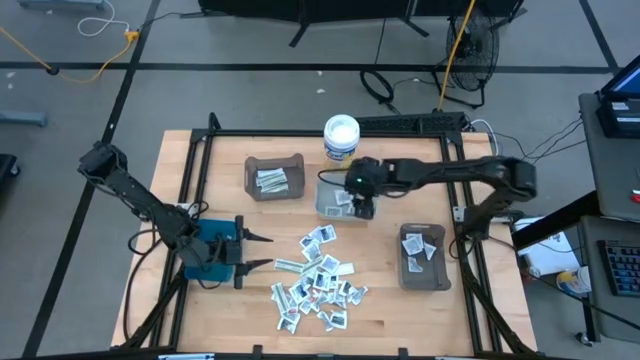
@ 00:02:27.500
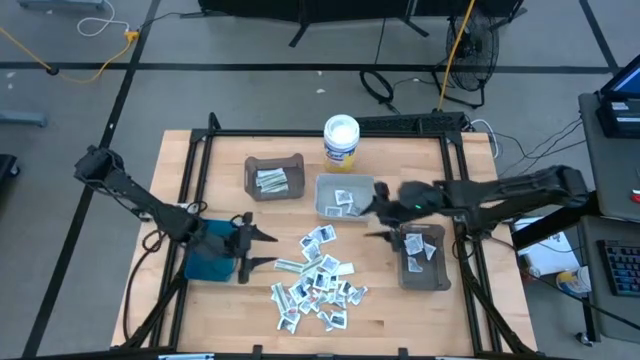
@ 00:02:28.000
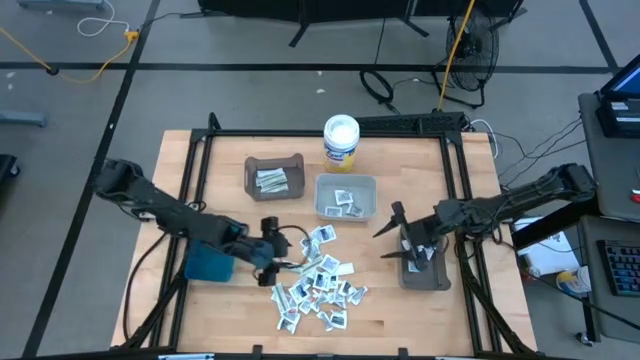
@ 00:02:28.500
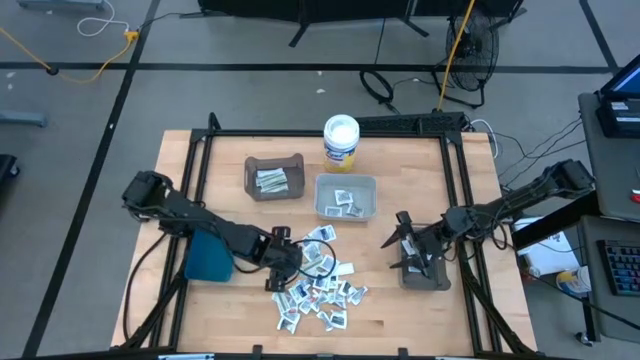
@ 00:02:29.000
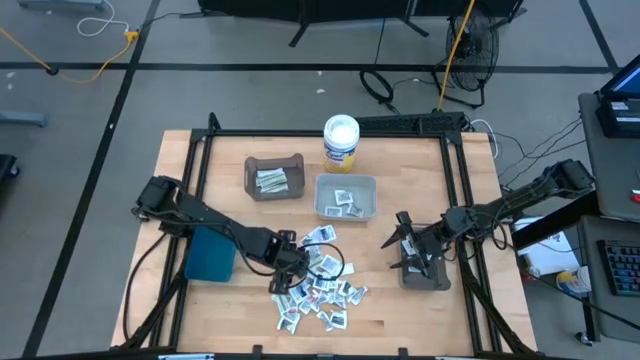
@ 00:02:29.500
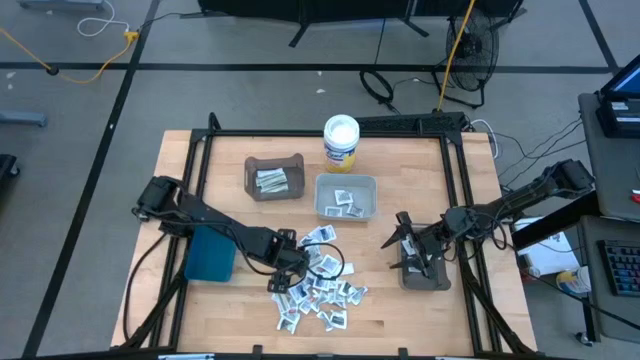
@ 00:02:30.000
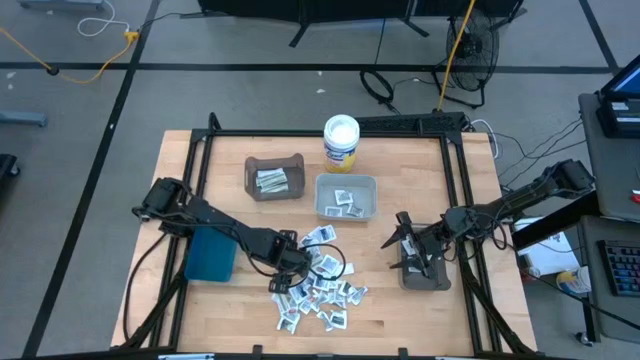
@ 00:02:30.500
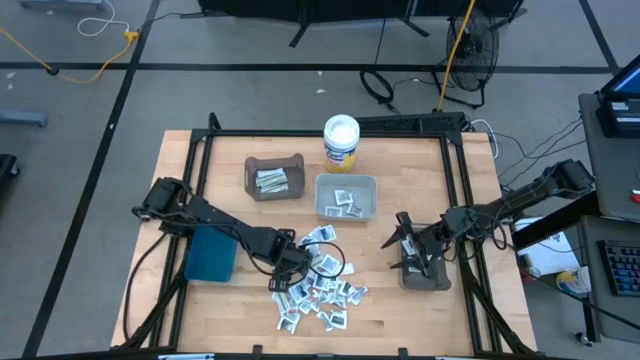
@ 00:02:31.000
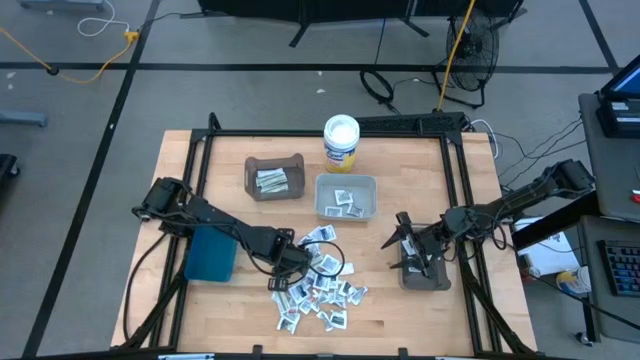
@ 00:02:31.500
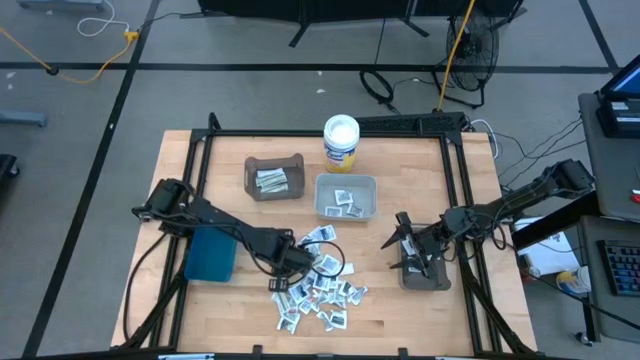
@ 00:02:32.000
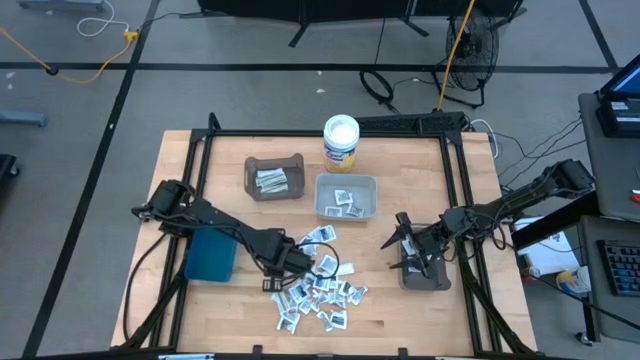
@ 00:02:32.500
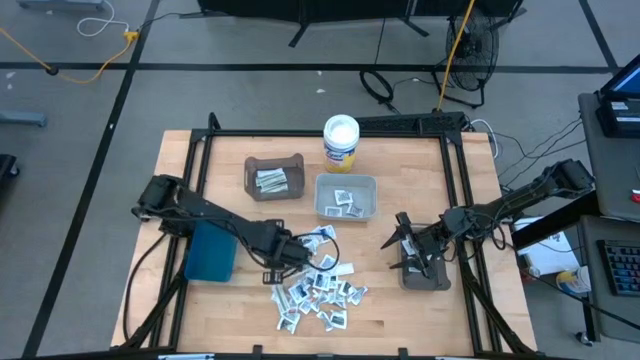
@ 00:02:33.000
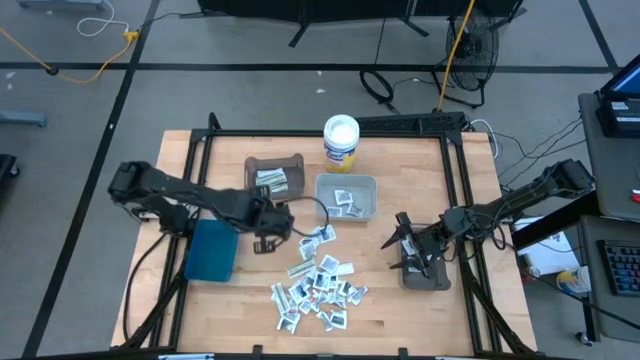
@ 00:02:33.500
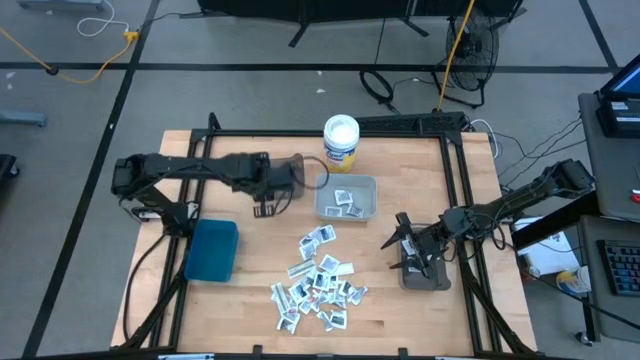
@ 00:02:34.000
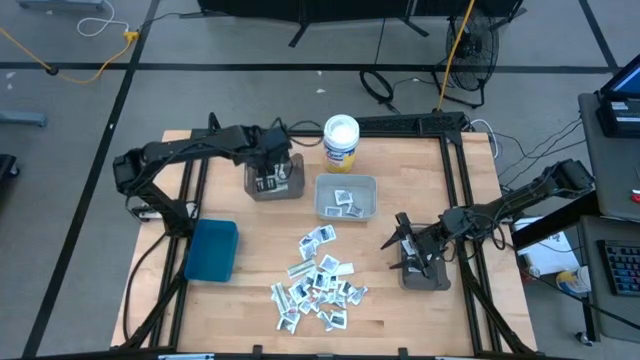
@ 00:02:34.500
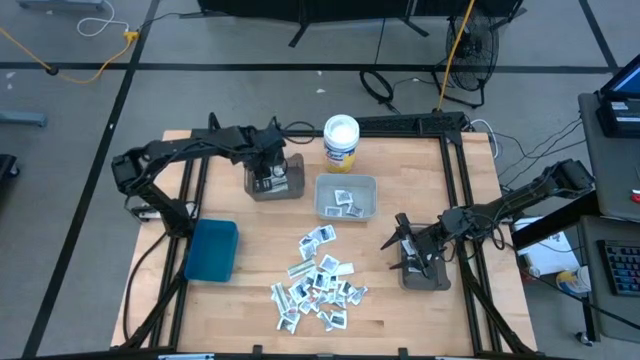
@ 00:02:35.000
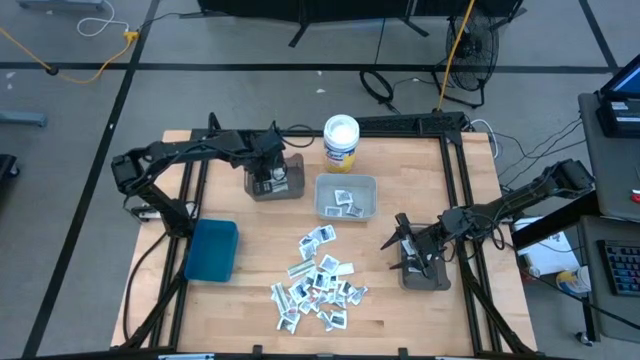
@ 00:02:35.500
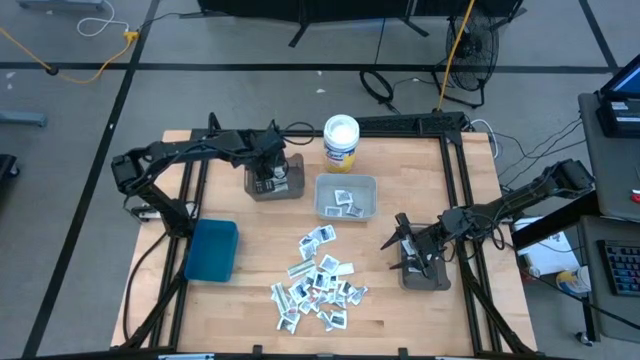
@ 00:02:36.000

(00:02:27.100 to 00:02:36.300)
Task: Pick & Place First Aid Supplies
Put the green bandage pack into the top black bin

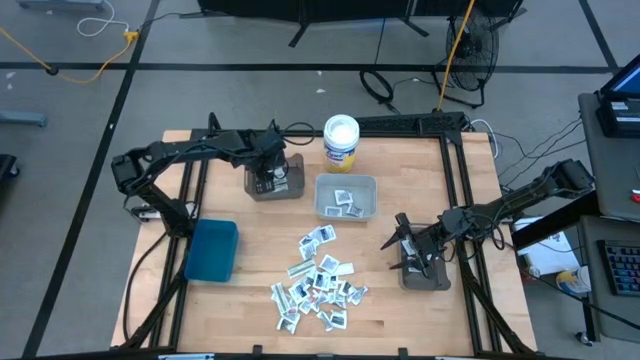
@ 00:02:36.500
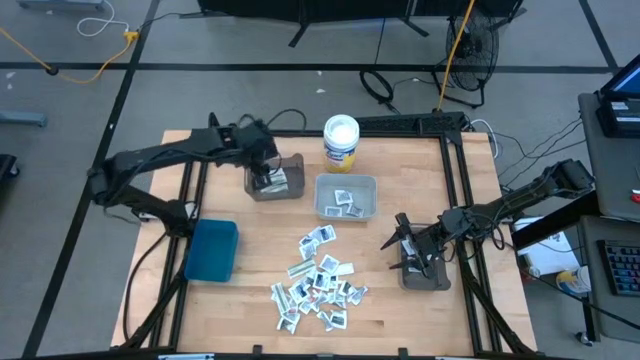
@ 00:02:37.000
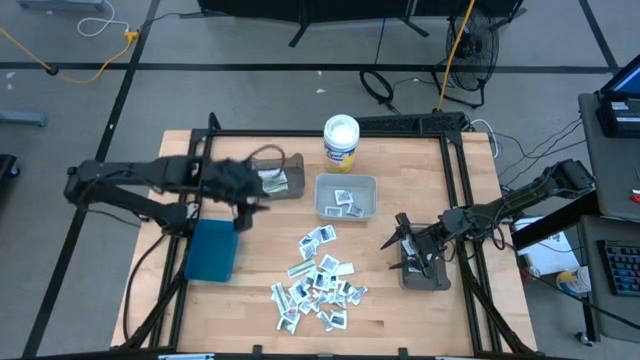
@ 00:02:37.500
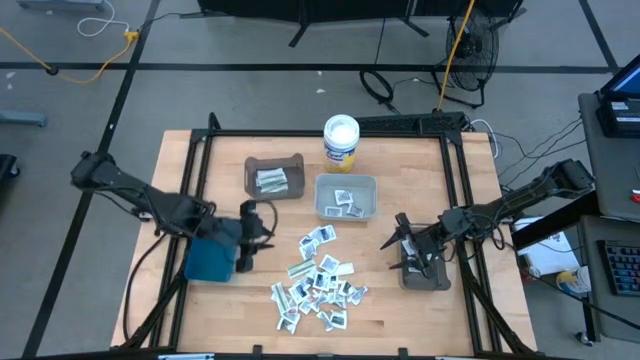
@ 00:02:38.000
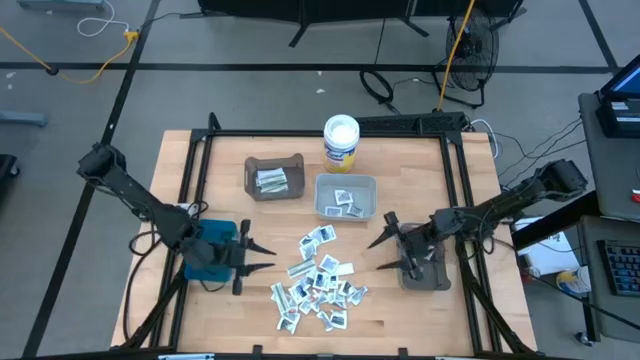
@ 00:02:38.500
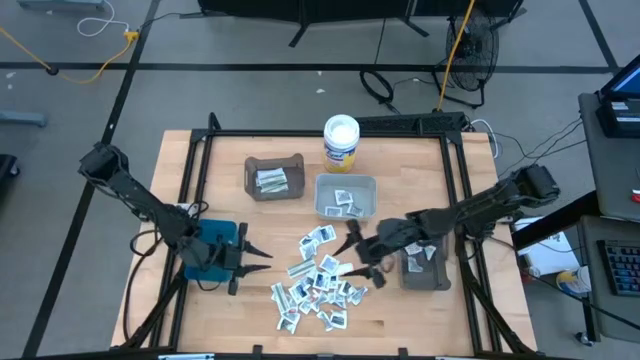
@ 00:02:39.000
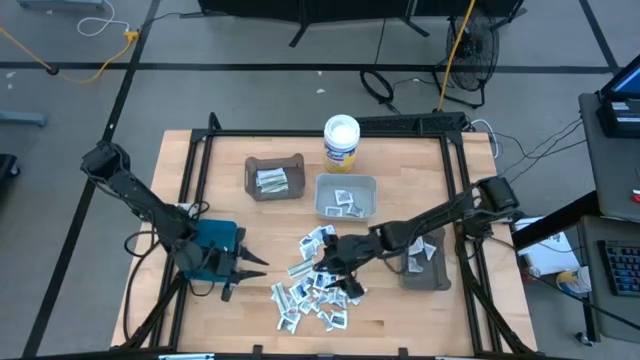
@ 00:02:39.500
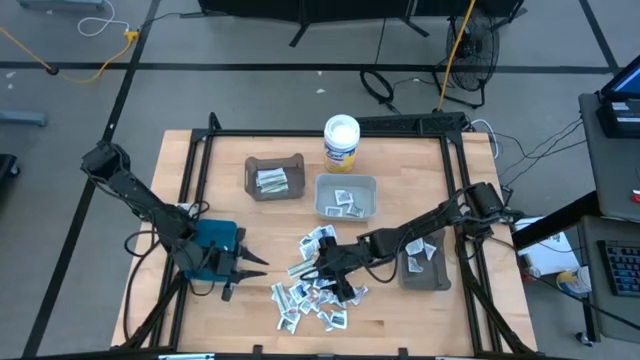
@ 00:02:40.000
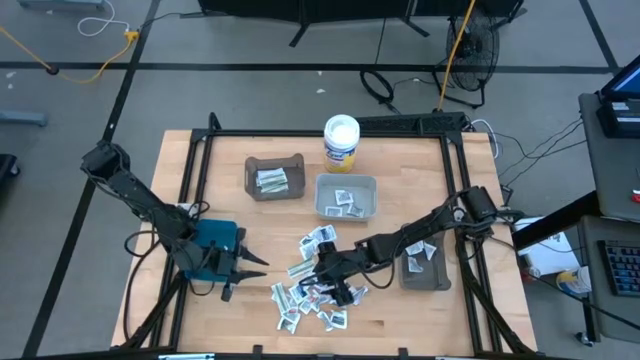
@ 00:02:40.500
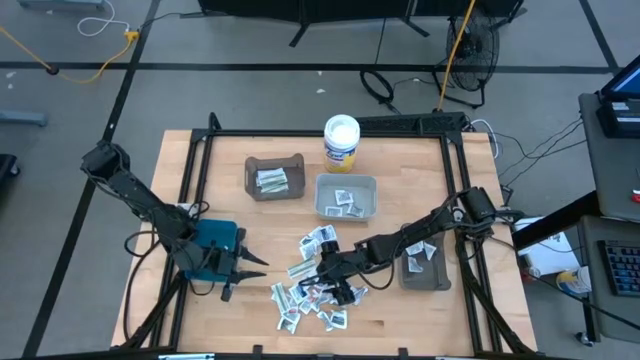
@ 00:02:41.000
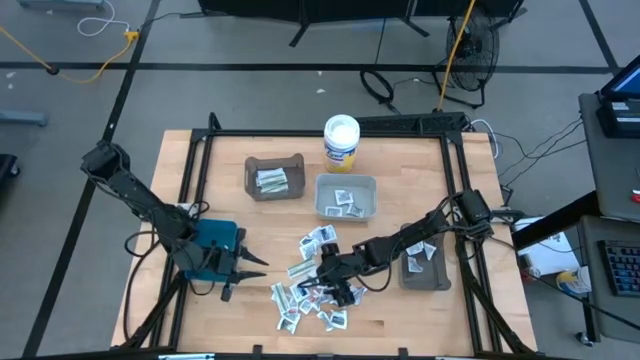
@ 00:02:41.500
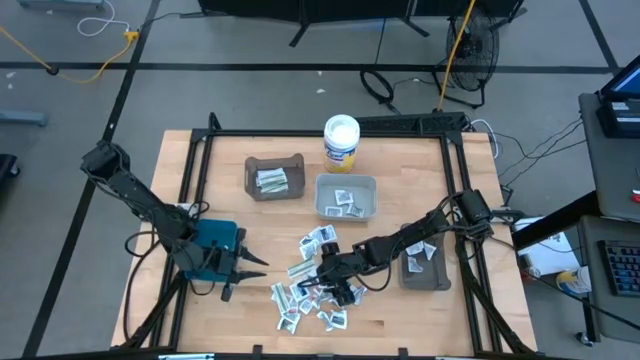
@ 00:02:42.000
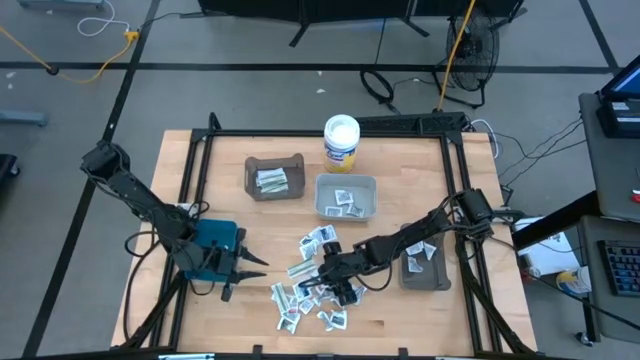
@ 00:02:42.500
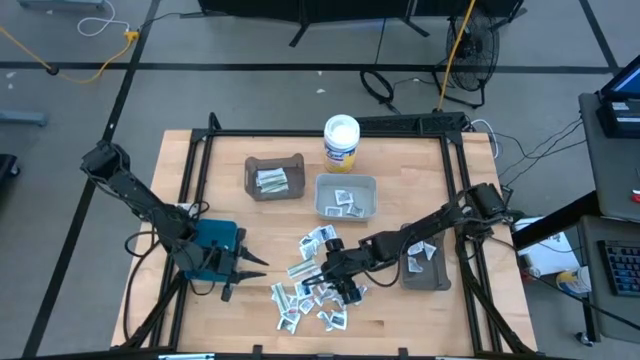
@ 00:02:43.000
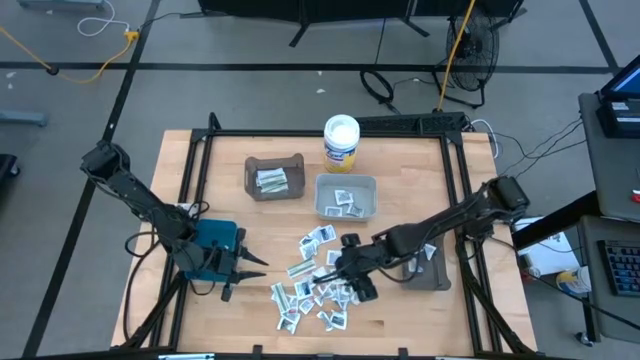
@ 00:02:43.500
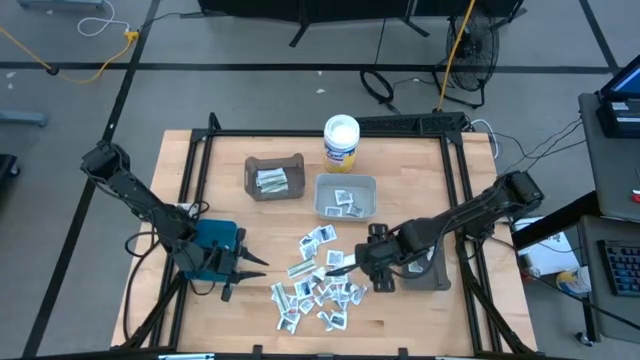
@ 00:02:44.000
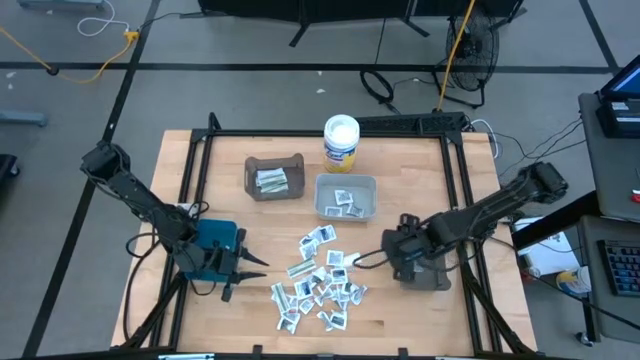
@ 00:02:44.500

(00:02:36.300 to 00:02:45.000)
Put the blue alcohol pad into the bottom black bin

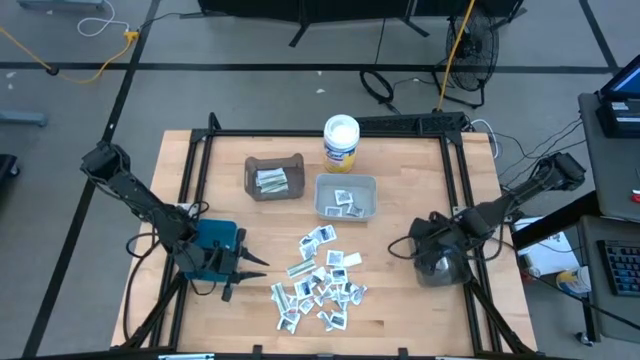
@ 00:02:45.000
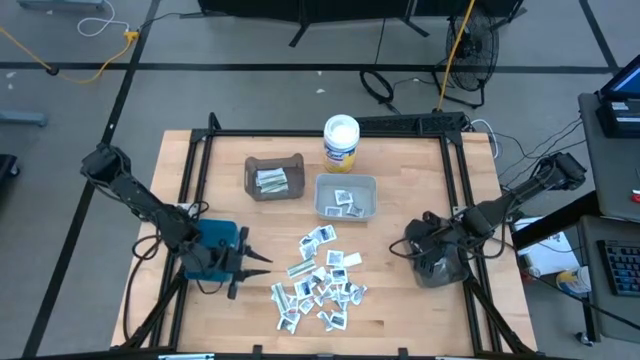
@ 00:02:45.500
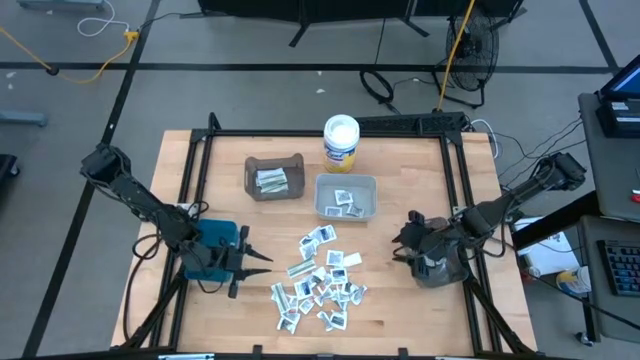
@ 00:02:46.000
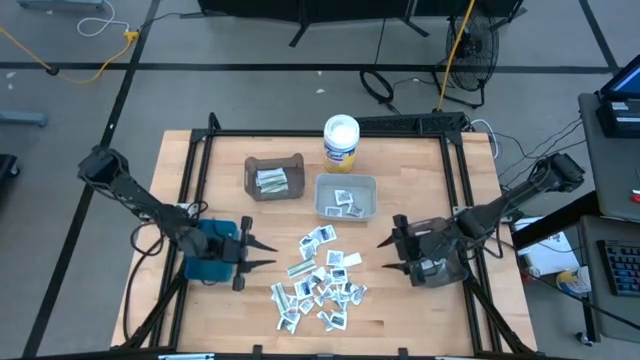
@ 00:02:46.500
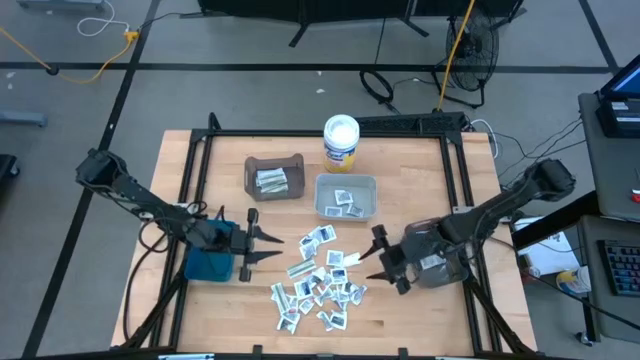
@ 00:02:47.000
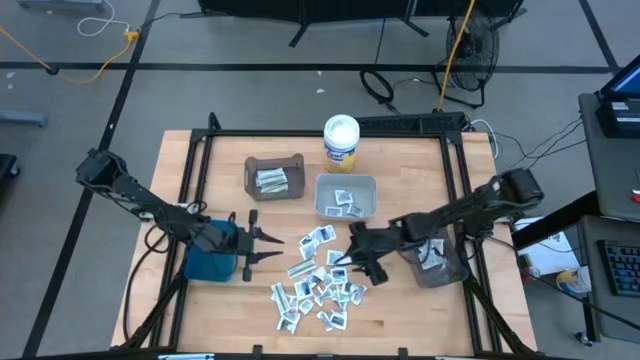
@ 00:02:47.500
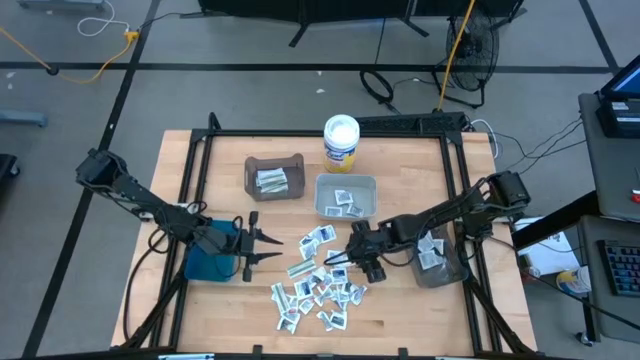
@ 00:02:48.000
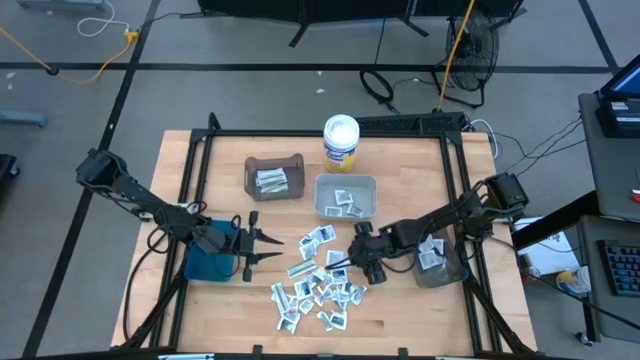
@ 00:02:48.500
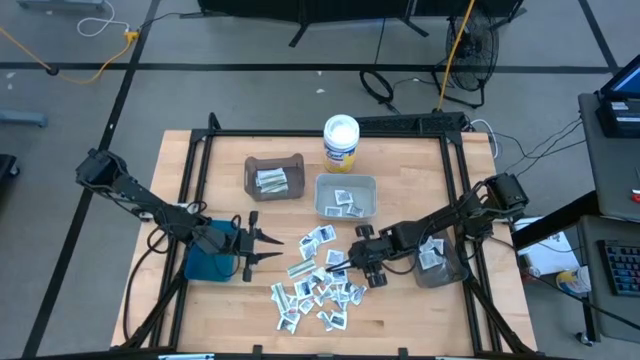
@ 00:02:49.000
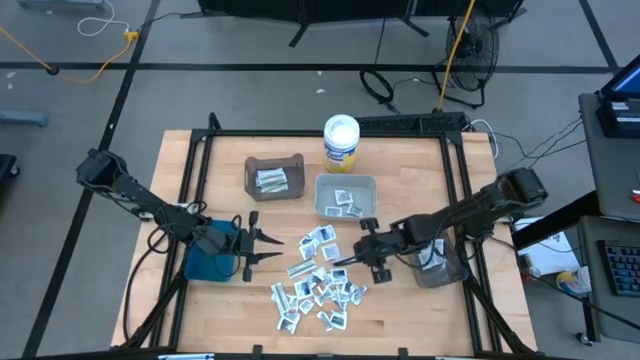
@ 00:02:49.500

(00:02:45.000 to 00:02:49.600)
Put the green bandage pack into the top black bin
